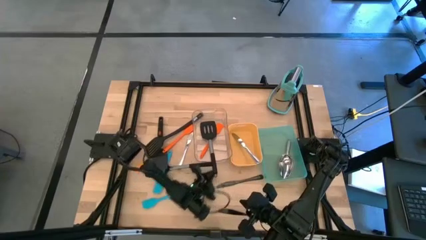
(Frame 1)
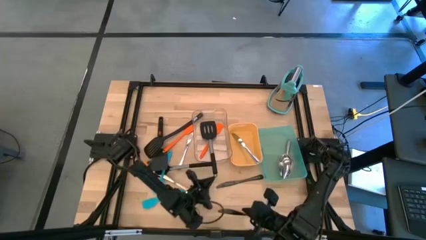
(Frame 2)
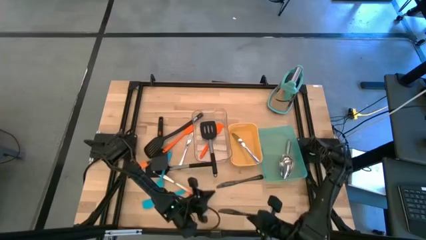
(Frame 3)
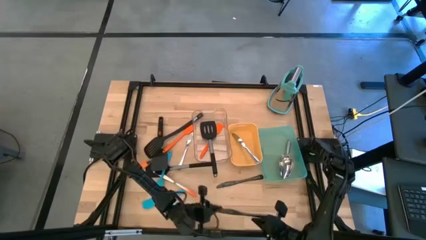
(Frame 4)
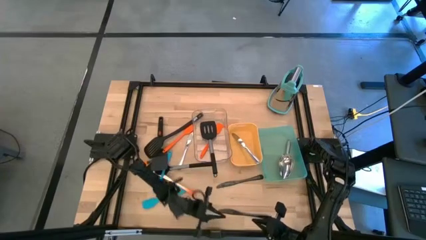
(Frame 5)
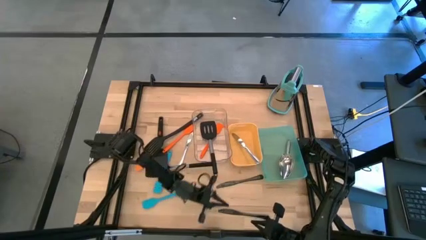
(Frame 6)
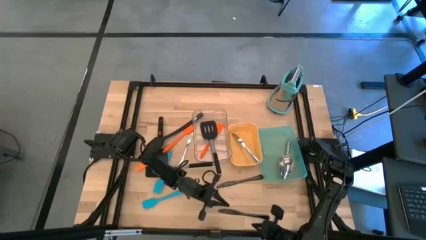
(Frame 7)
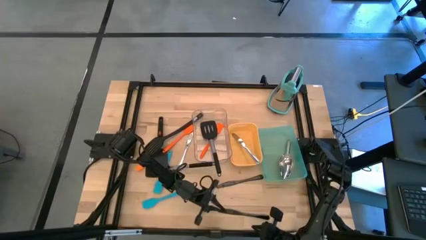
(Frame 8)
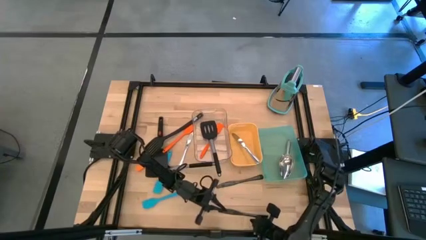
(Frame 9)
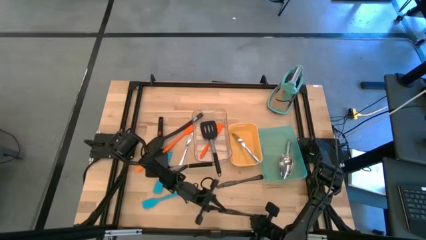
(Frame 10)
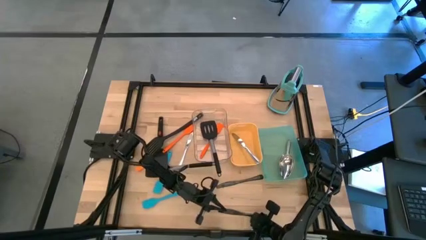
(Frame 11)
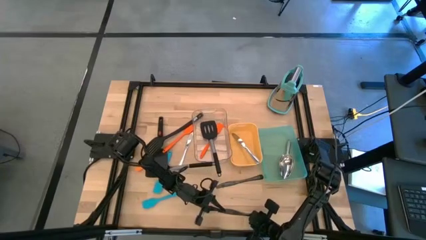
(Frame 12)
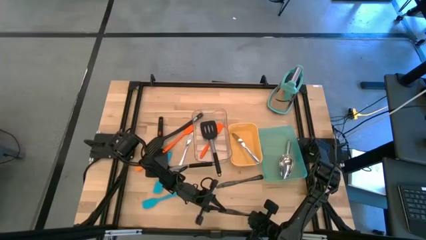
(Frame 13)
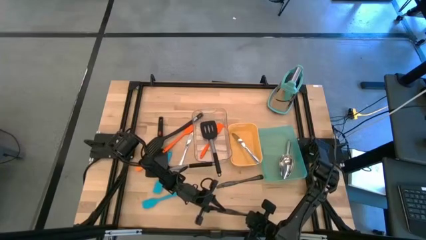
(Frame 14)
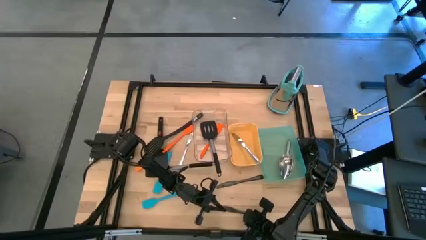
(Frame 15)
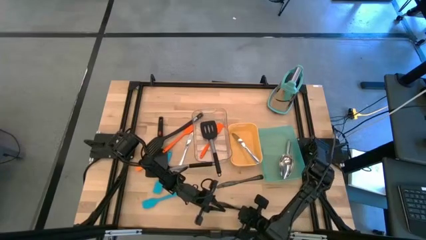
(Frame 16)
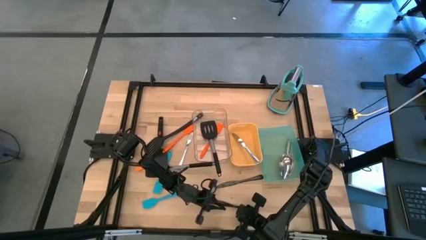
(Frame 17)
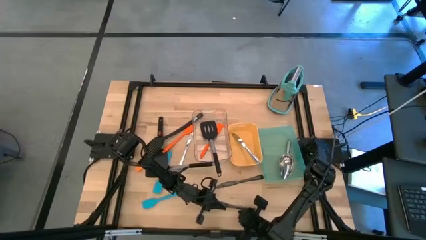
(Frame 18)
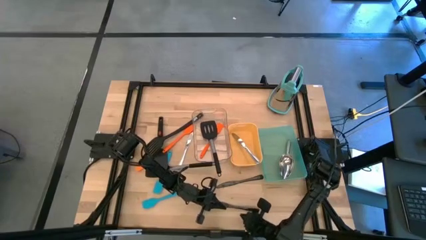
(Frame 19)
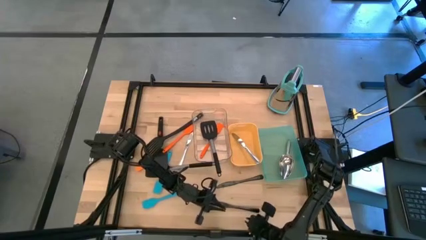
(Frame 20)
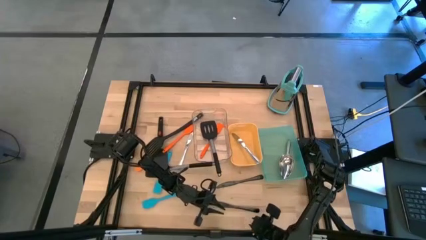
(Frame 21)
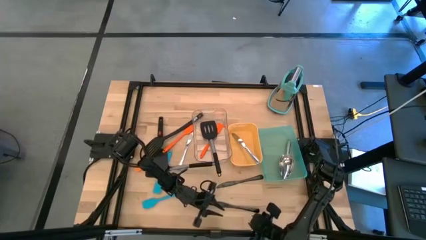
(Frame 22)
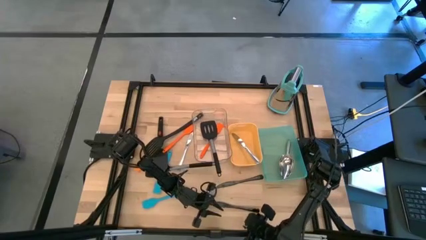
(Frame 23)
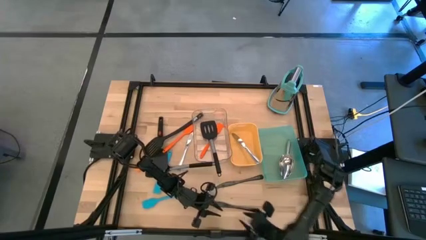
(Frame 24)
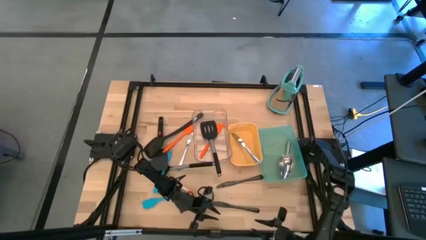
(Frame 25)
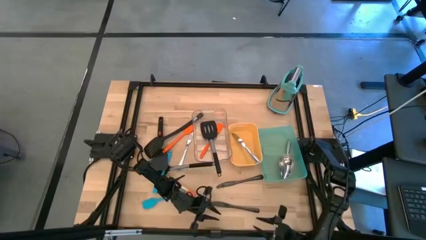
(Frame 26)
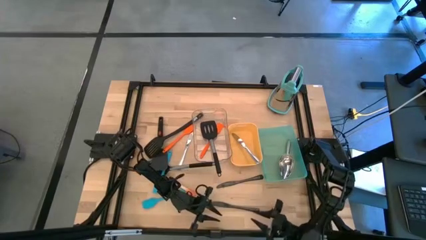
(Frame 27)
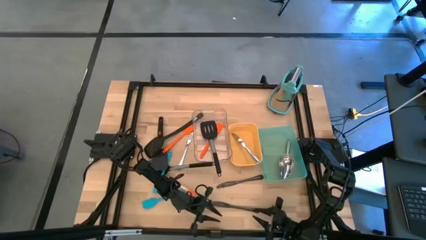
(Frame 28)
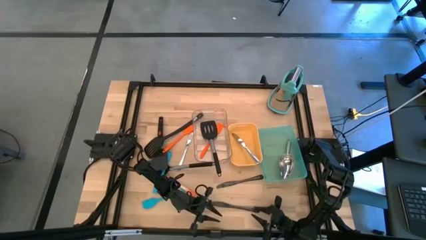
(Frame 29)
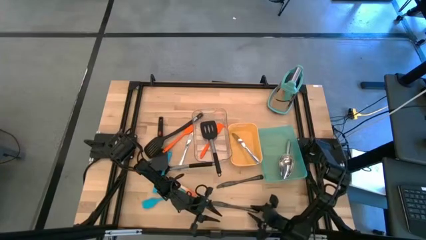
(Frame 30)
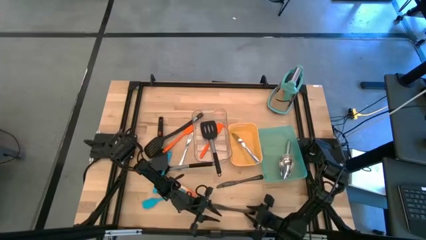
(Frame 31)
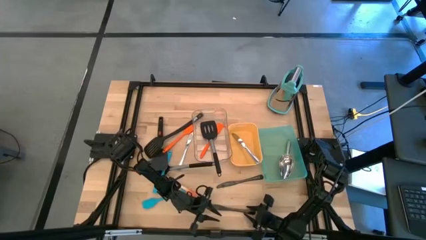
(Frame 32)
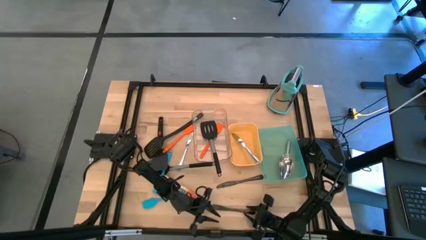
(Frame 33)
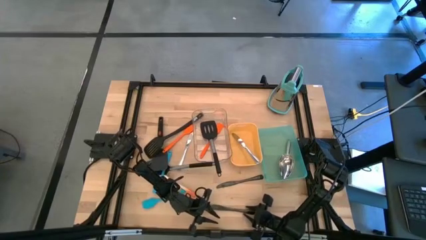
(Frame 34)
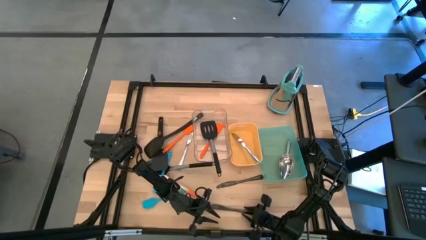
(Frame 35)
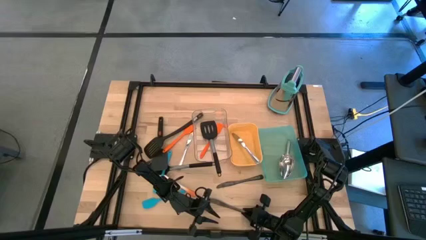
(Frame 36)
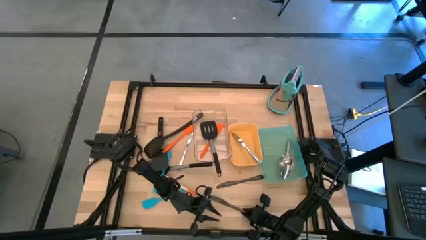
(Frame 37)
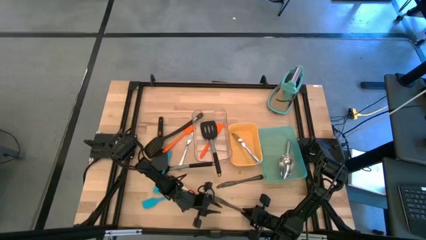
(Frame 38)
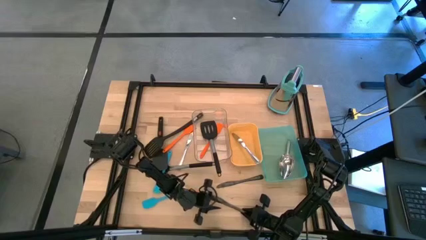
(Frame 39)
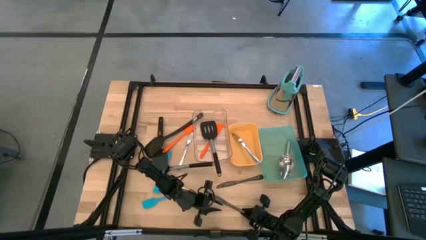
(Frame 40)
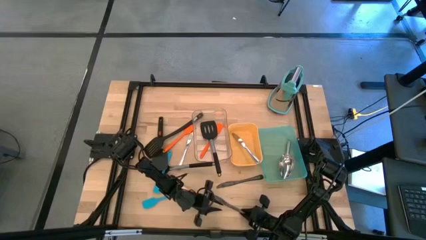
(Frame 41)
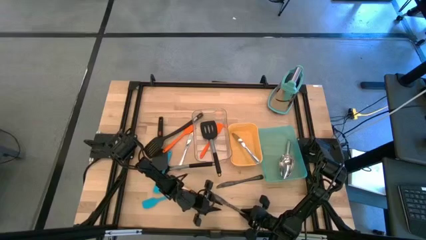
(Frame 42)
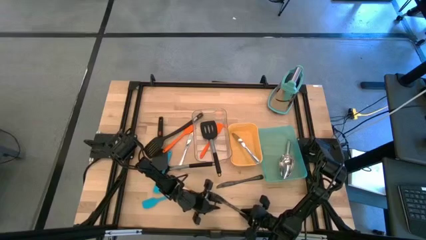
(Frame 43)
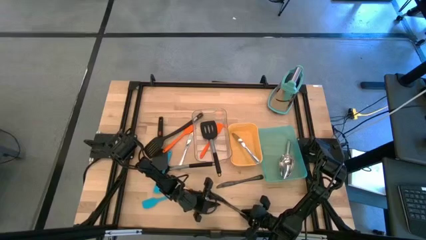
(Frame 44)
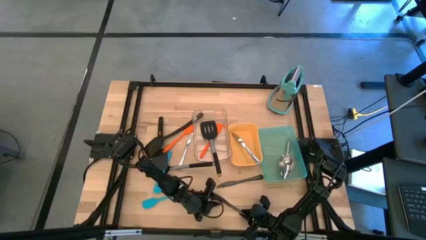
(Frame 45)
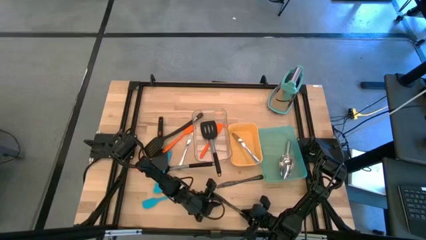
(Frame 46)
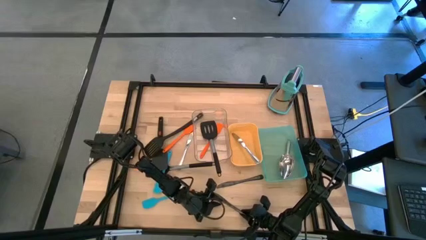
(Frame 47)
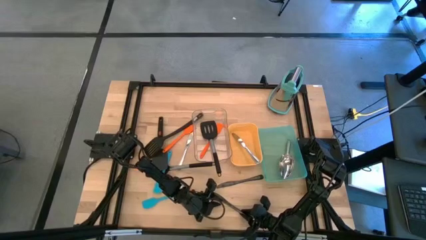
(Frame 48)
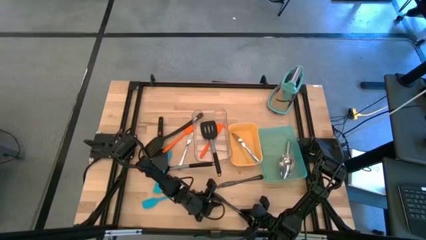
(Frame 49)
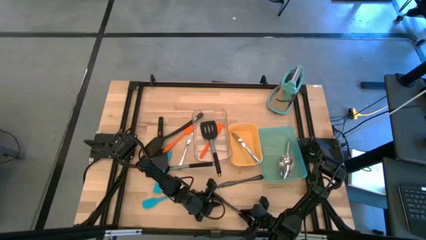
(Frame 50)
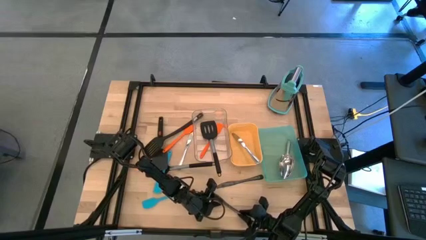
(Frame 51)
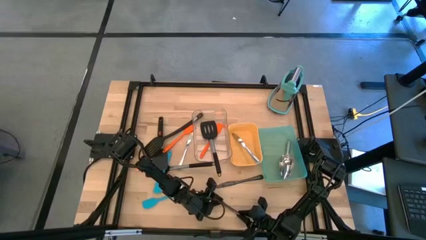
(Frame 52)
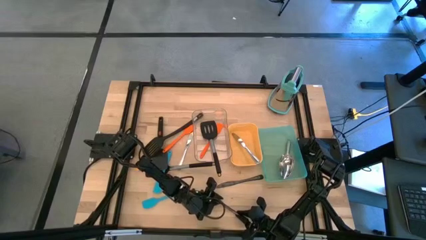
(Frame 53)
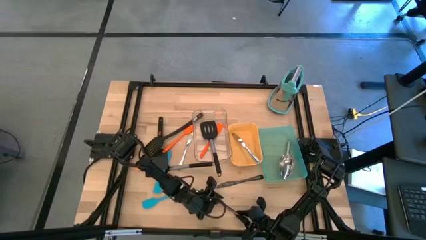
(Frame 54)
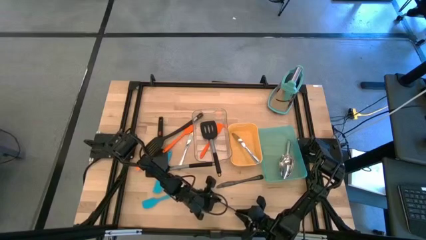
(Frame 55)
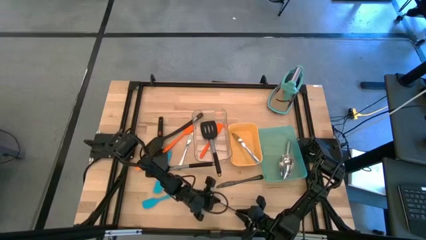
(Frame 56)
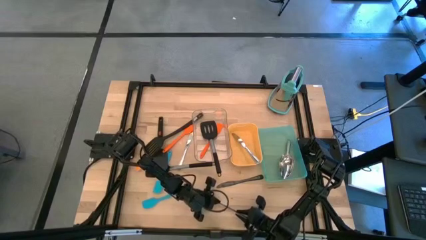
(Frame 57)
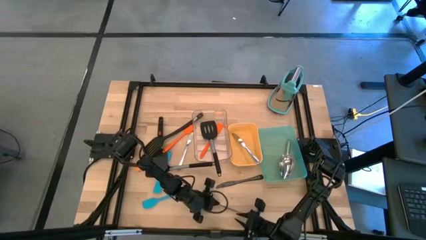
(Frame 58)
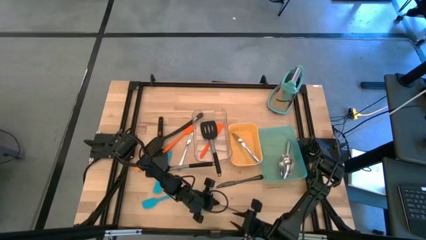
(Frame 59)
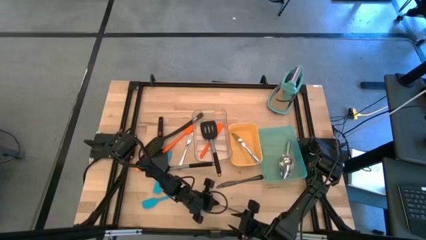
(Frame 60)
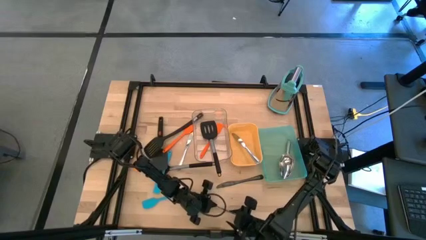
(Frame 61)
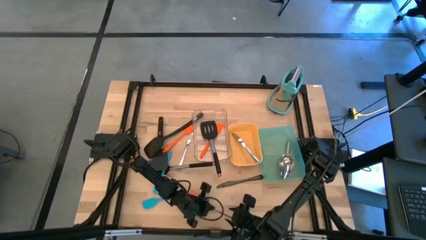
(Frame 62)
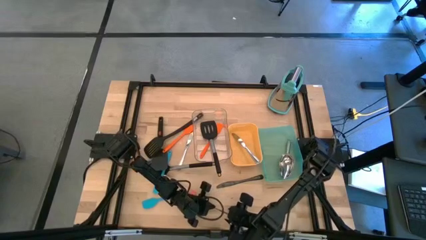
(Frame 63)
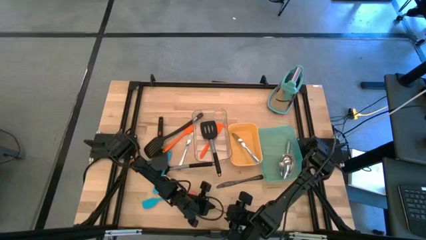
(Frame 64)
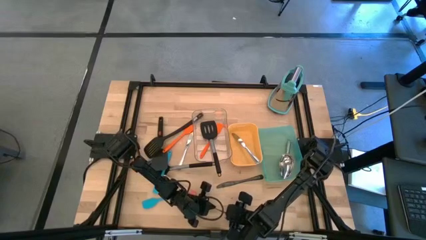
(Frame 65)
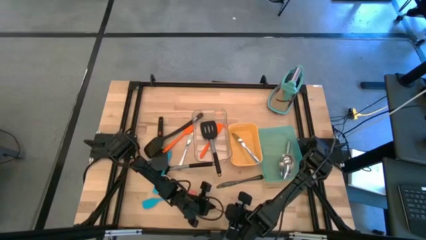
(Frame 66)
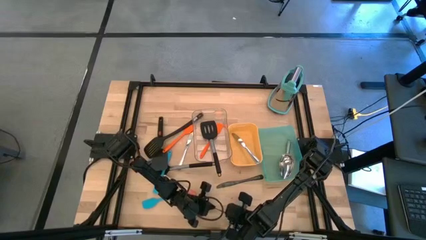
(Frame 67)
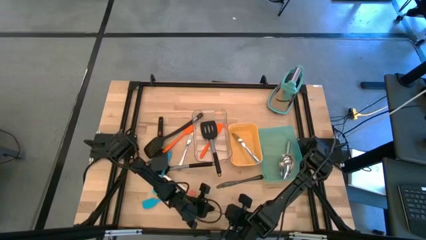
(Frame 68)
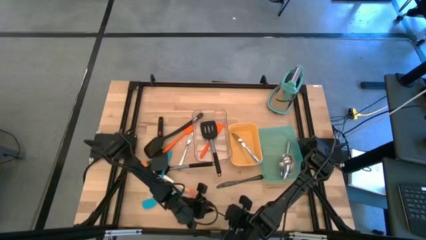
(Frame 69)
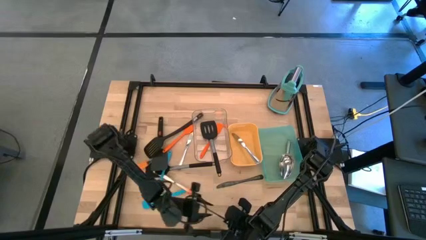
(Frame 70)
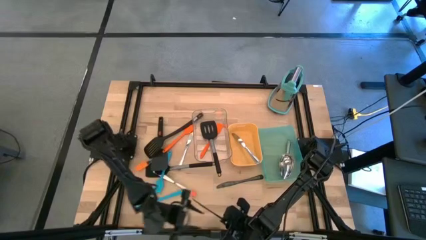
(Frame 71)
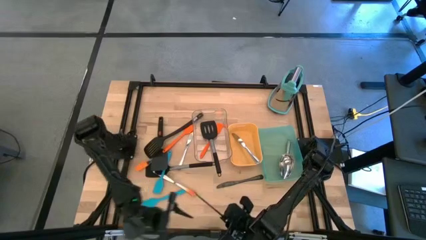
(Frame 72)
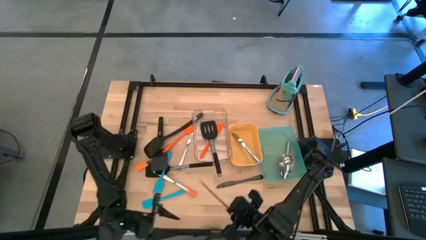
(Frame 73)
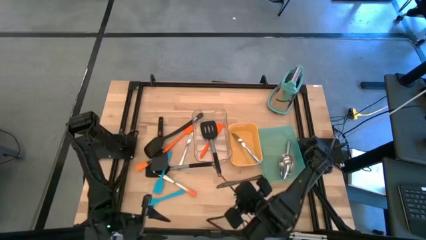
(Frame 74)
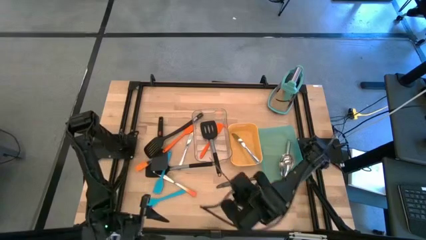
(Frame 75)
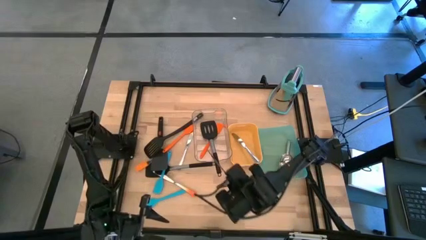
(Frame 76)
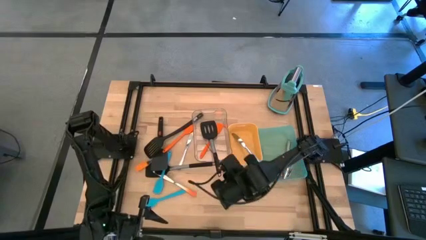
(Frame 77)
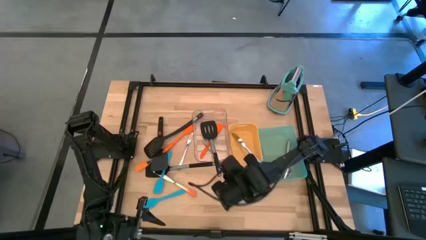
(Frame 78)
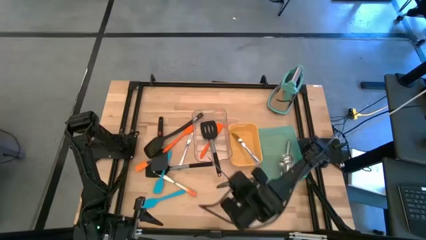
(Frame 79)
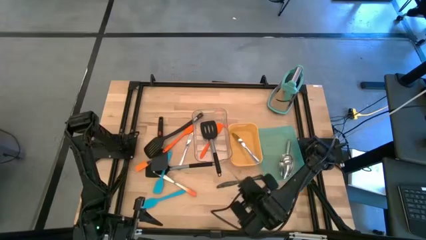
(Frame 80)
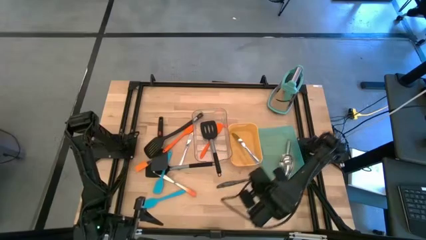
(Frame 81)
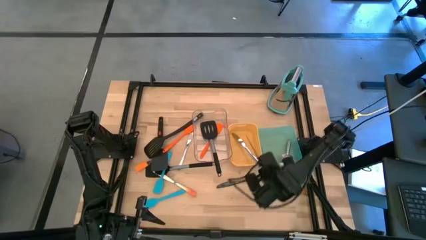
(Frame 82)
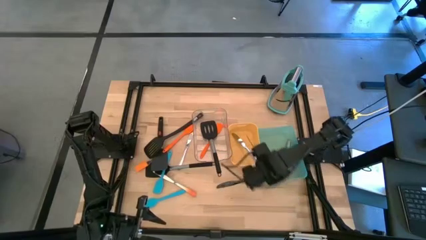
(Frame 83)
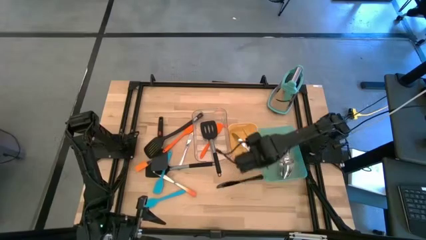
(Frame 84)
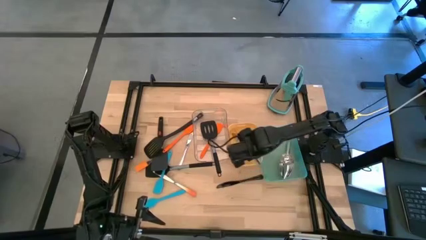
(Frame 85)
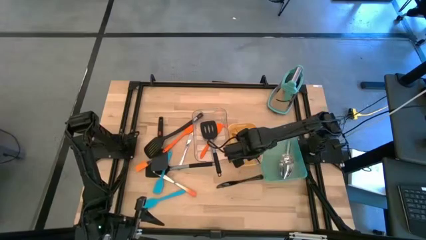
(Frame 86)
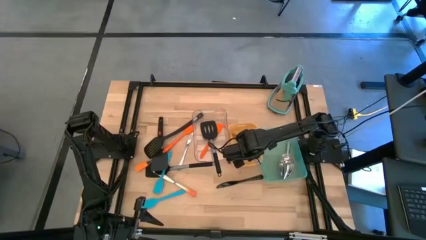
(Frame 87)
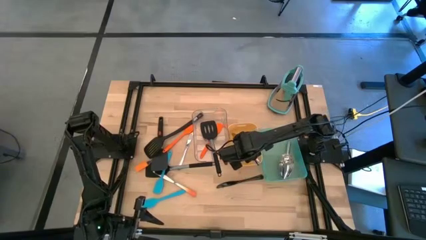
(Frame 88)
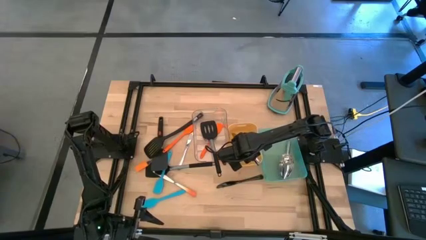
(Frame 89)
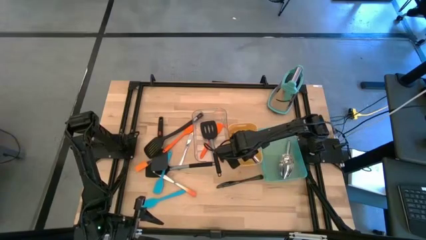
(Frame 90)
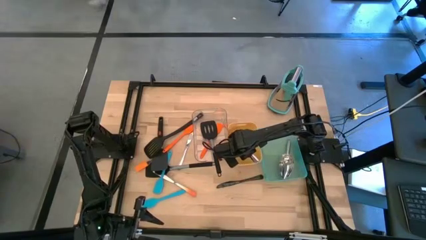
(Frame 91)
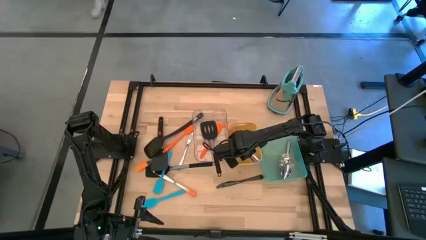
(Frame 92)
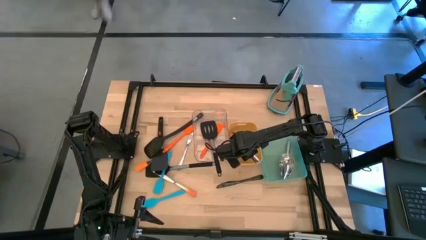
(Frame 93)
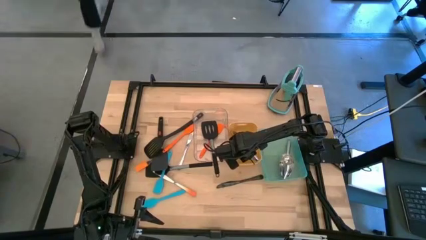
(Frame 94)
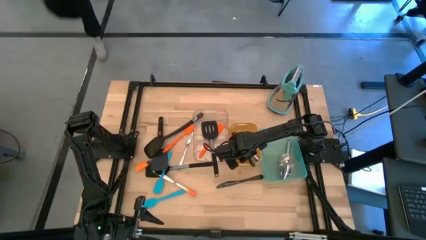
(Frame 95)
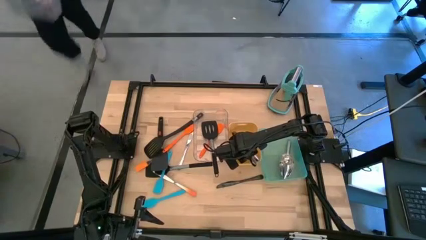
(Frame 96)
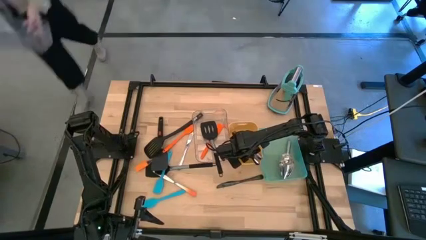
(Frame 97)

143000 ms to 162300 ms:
Task: Pick & Place Kitchen Items
Put the black table knife into the yellow bin
